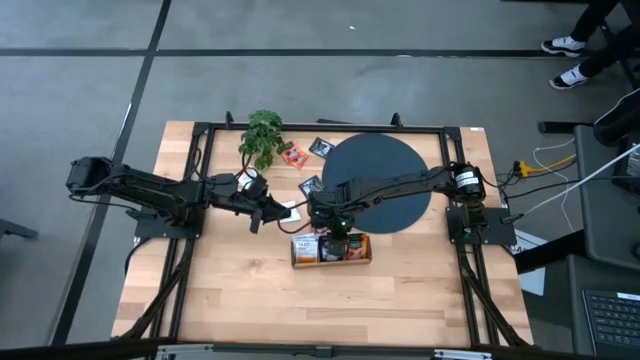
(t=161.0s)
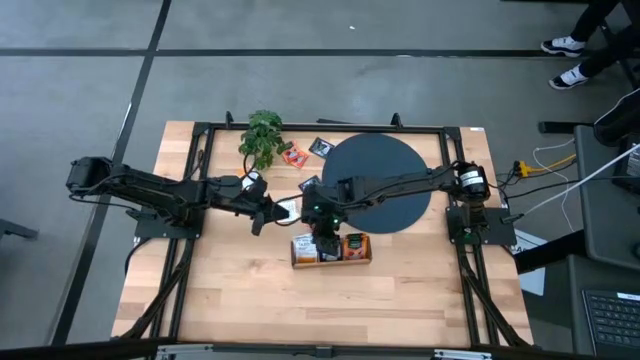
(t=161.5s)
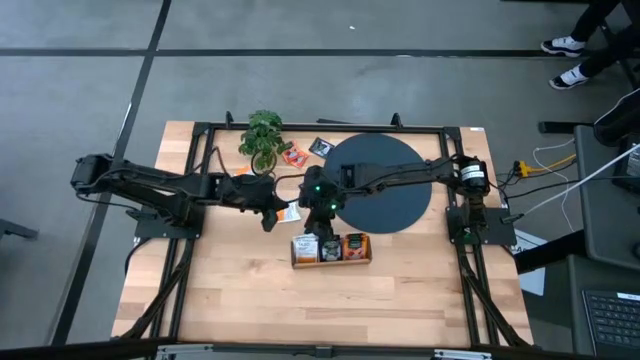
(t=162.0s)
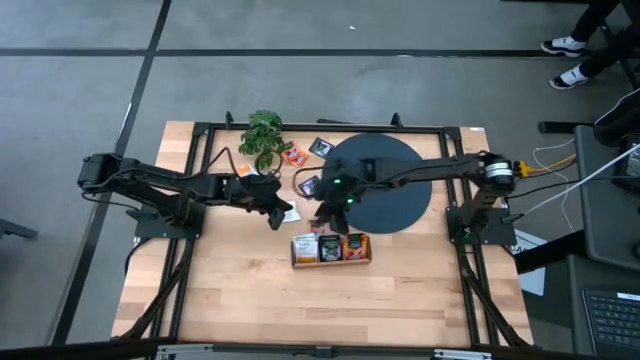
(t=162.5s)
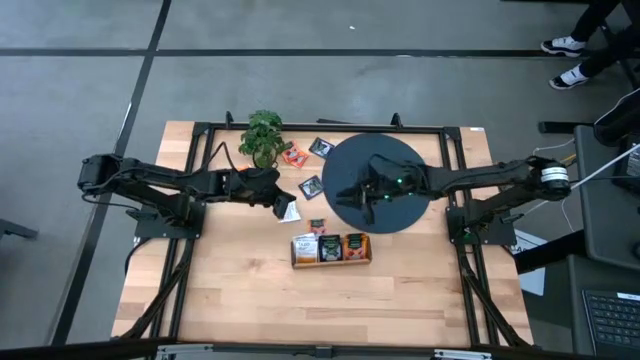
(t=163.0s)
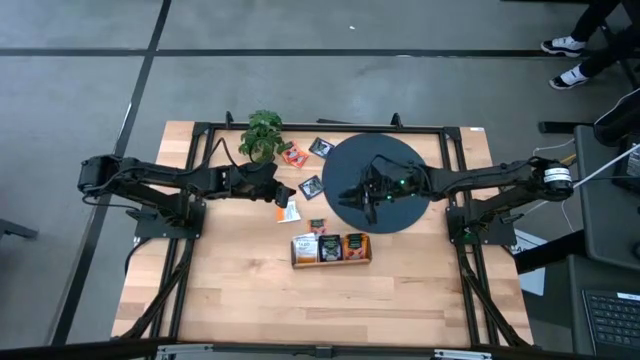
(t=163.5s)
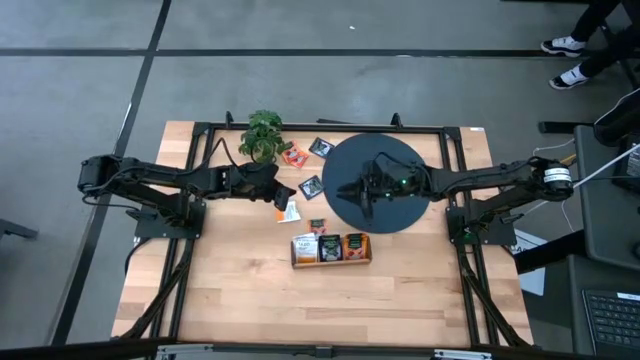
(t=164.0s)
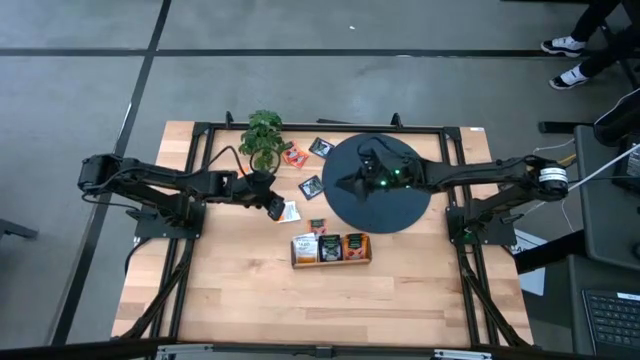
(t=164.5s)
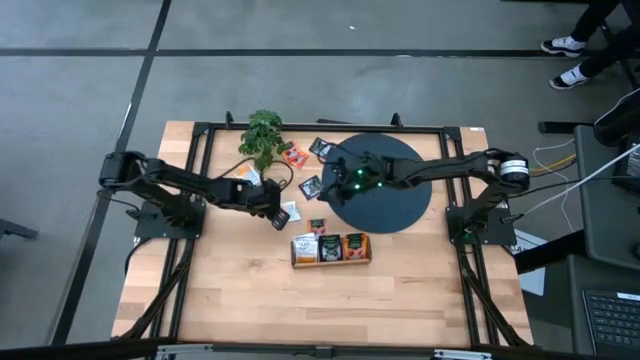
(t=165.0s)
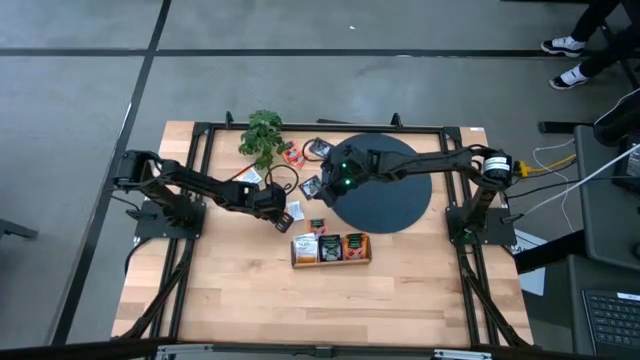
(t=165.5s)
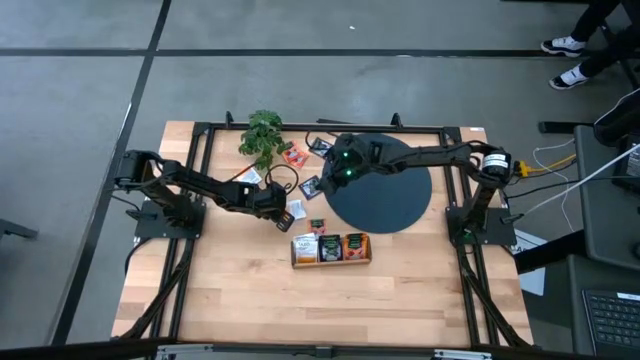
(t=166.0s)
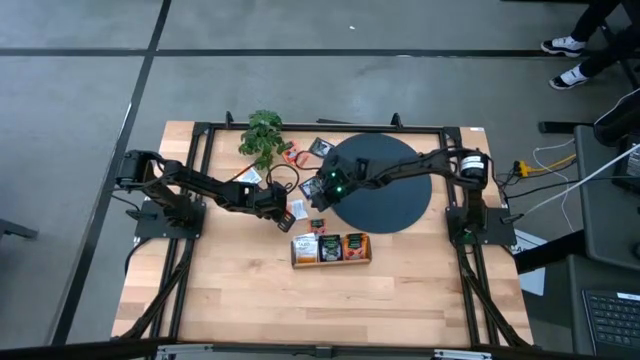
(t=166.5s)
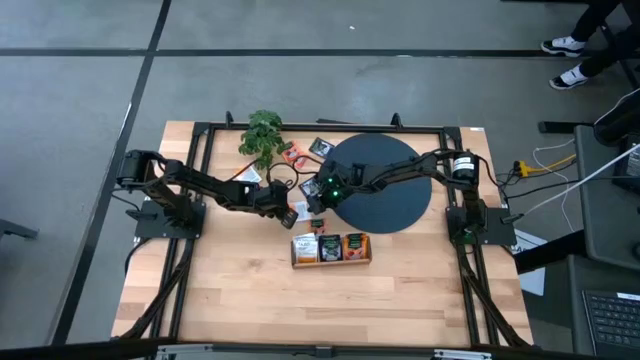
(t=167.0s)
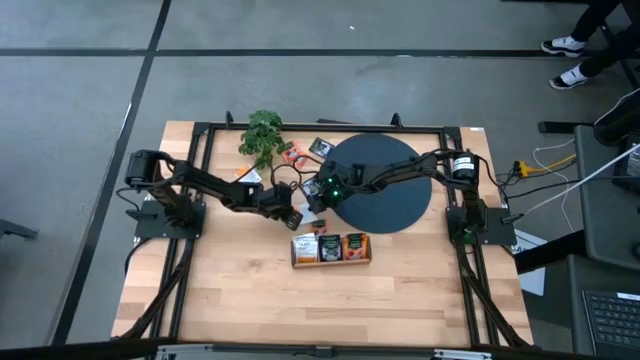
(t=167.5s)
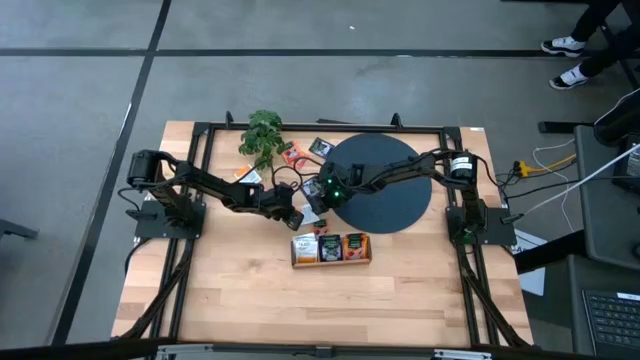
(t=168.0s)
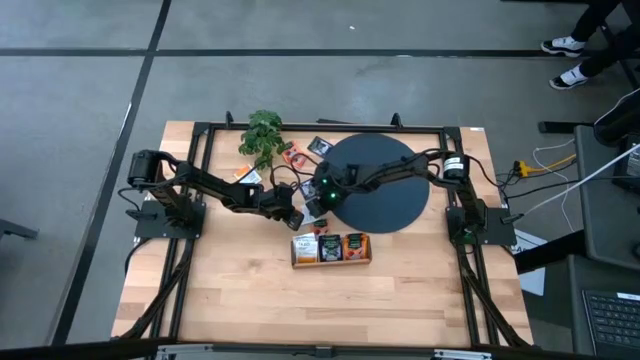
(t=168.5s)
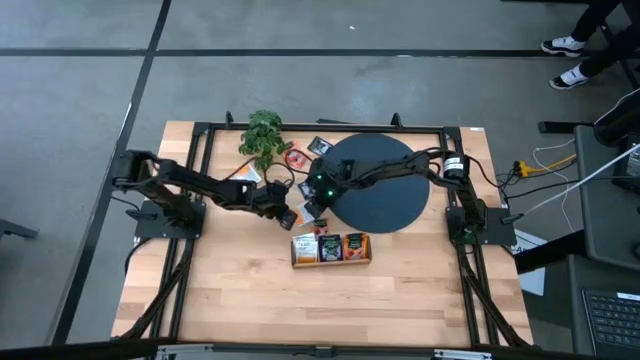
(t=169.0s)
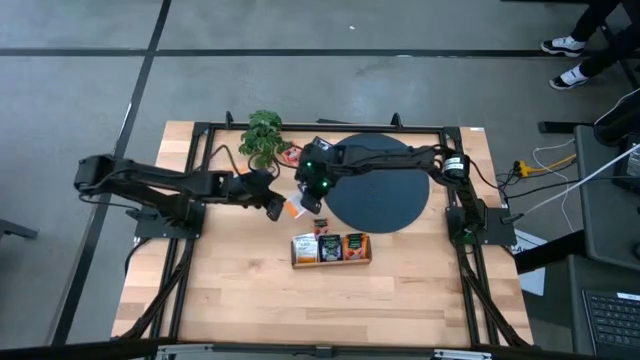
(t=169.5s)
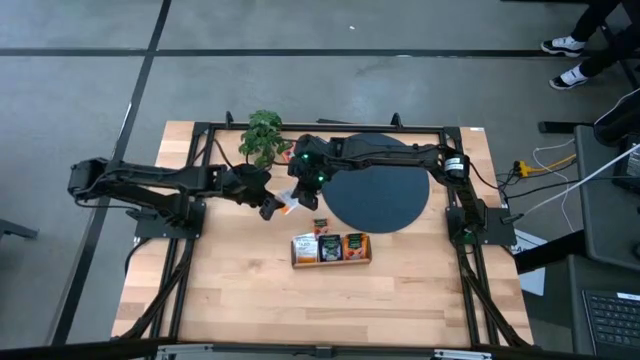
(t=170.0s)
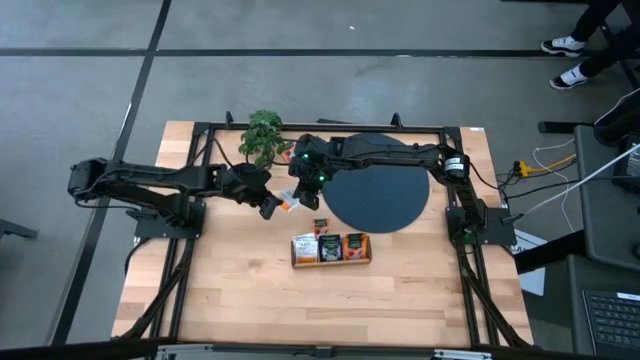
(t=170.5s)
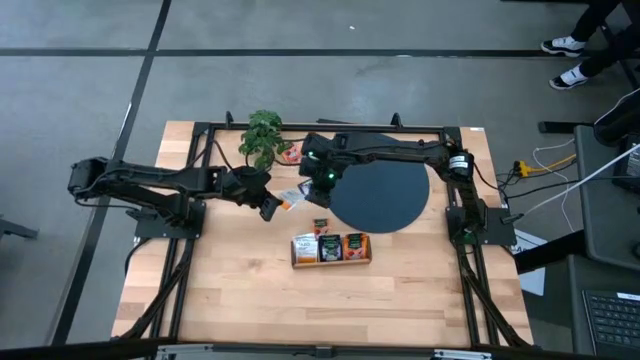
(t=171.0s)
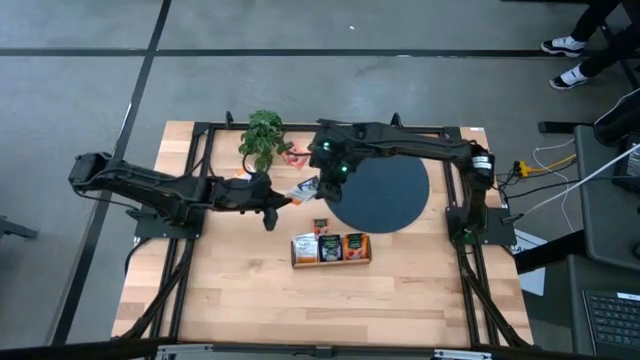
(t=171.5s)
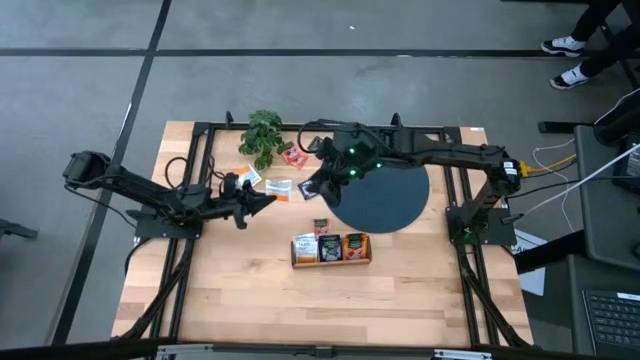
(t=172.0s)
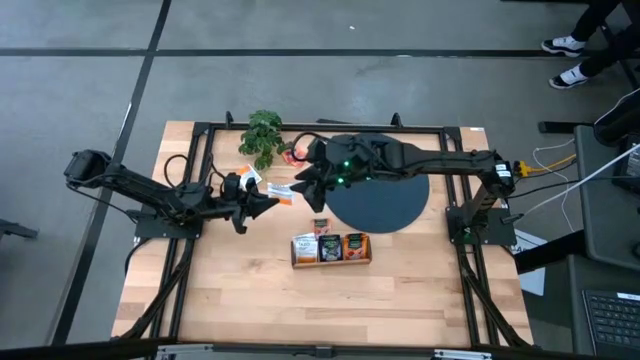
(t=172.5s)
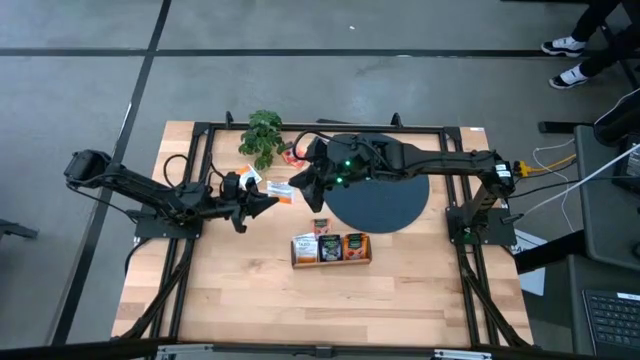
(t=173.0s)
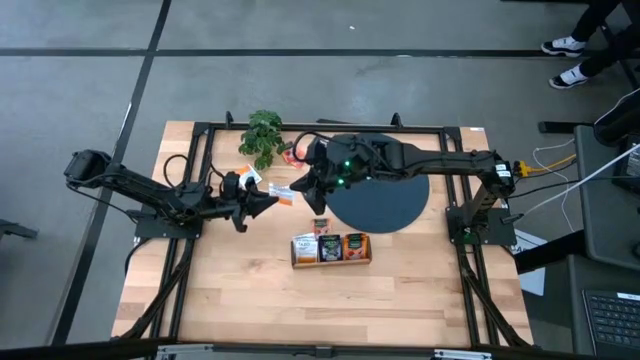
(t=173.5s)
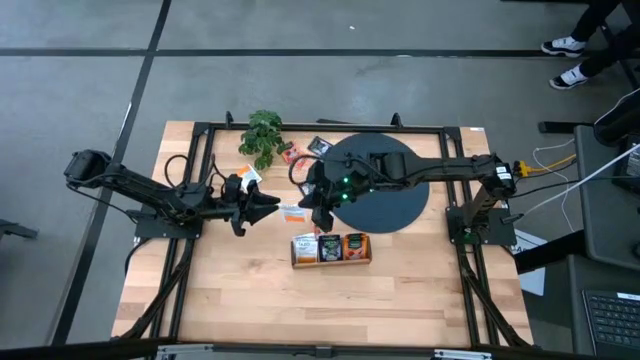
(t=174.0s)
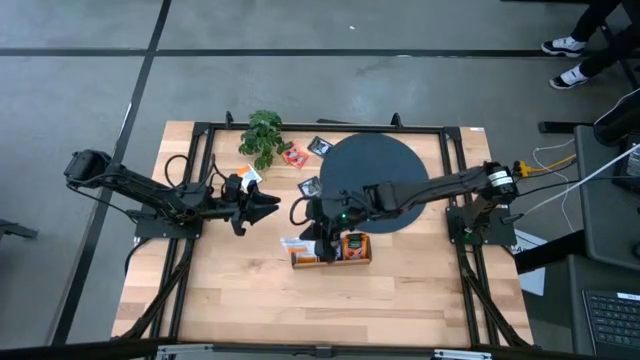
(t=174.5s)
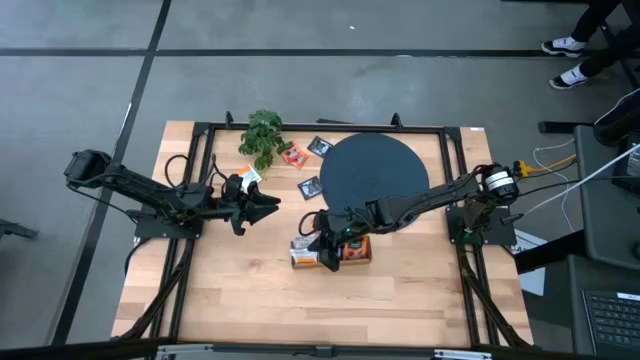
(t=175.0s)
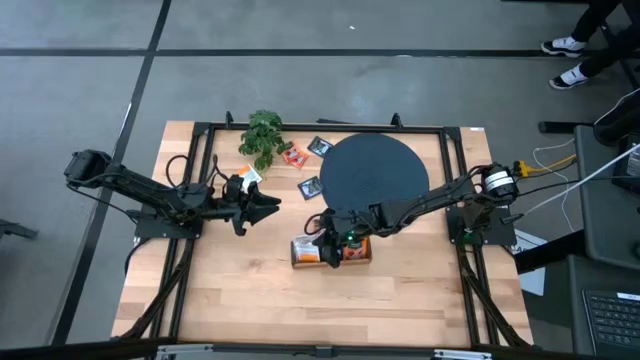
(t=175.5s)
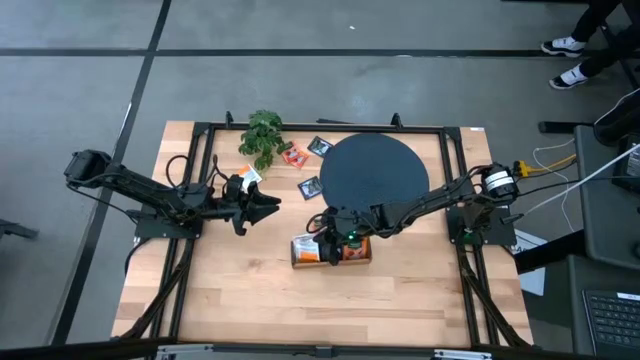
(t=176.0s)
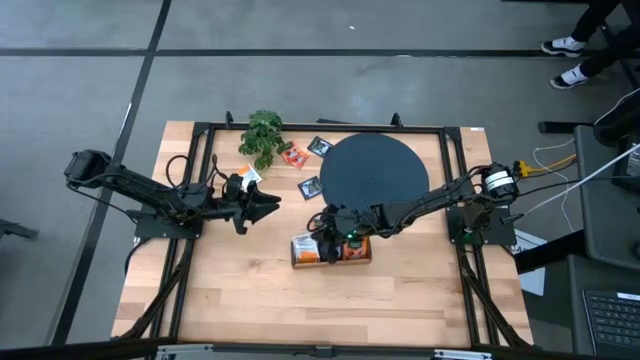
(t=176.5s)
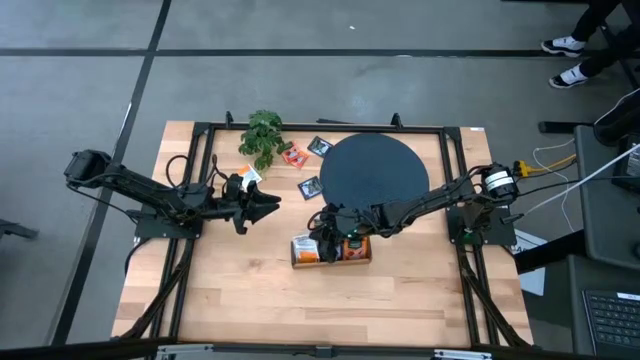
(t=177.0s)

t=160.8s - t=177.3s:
Task: Pick & Place Tea
Put the bottom white tea bag into the left section of the wooden organizer

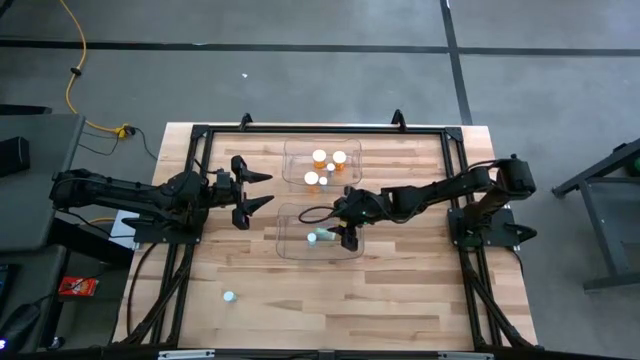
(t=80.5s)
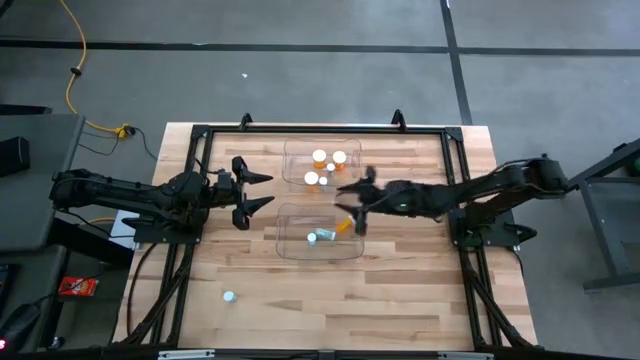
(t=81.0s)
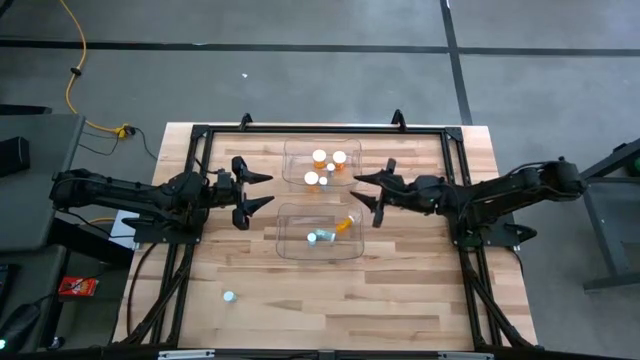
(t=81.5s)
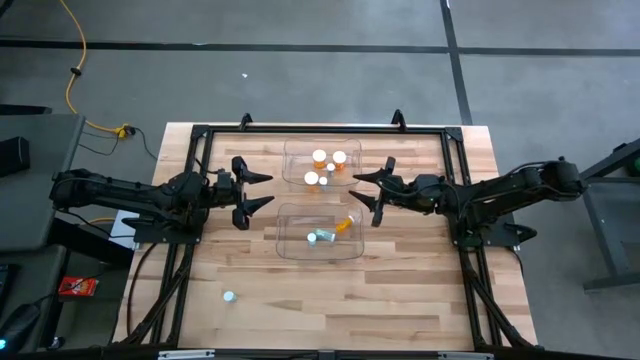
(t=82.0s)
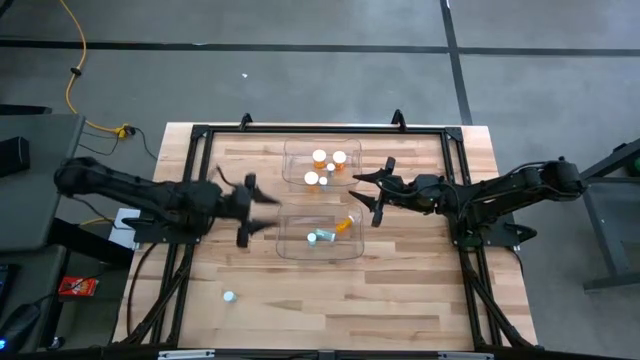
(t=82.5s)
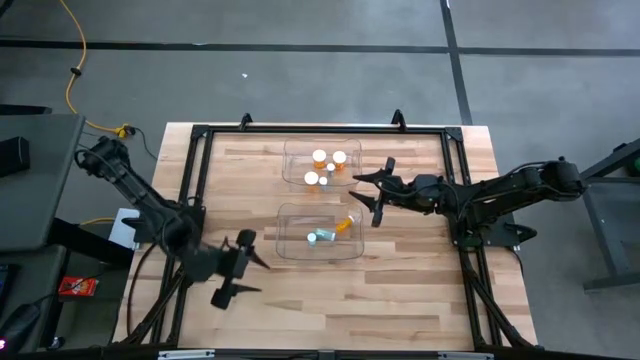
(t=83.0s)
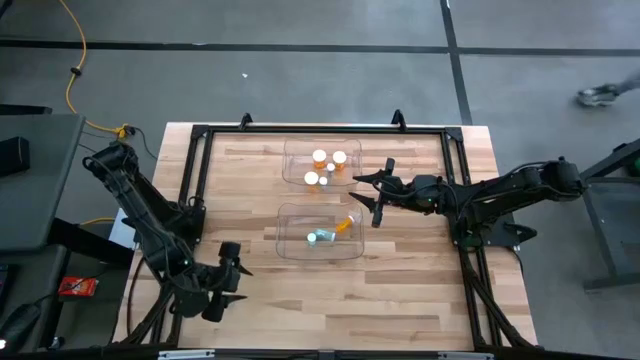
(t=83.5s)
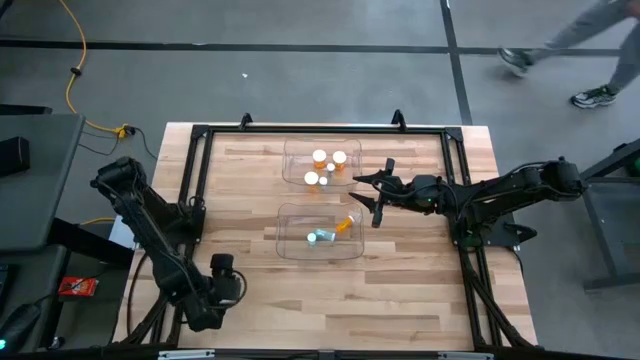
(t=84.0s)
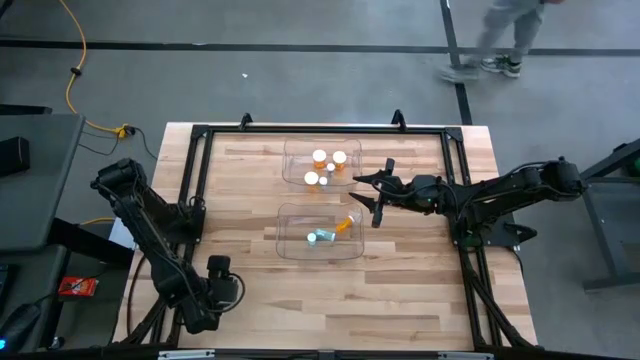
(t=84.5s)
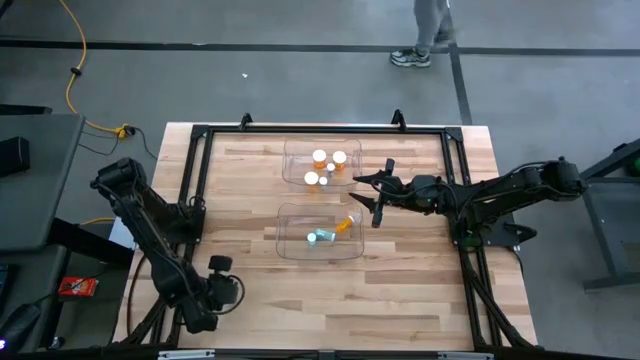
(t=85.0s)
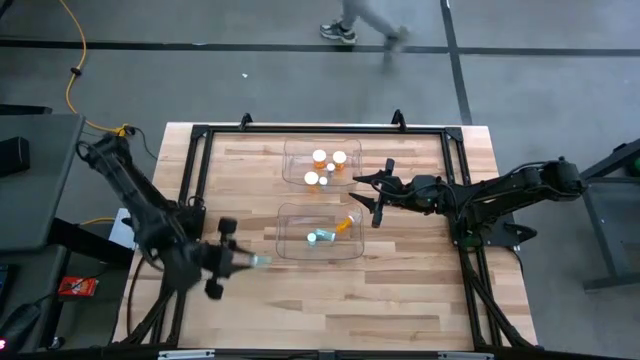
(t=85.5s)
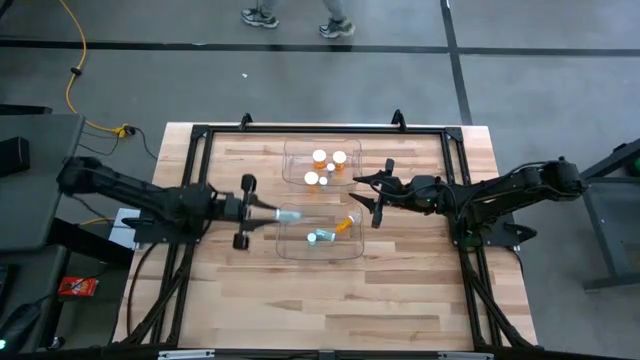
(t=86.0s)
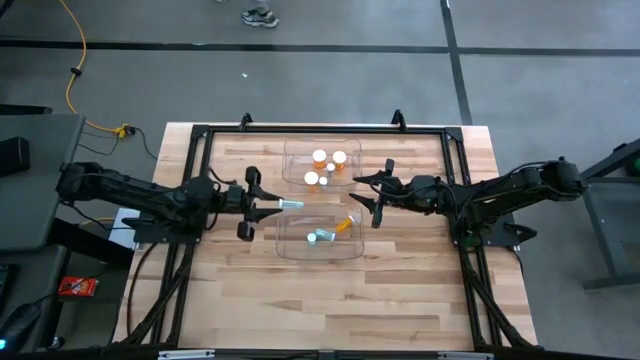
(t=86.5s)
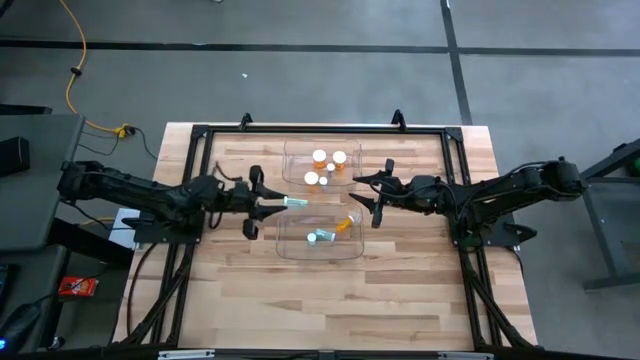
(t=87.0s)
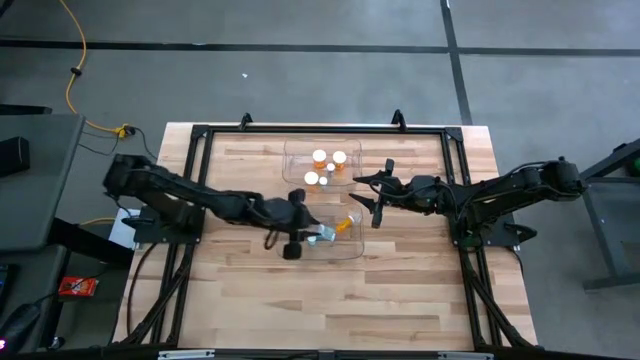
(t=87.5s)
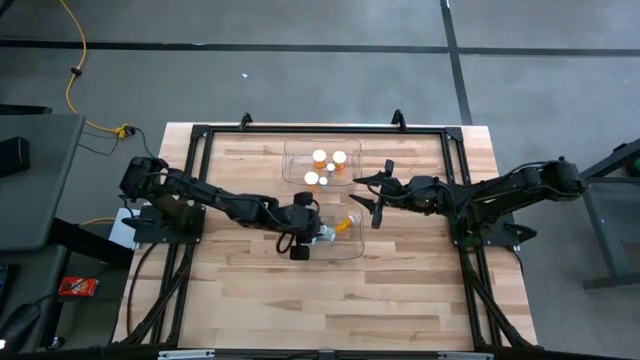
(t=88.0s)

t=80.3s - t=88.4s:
Task: Pick and place medicine bottles into bin by pill shape (circle, oval)
Put the blue tablet bottle into the bottom transparent bin
